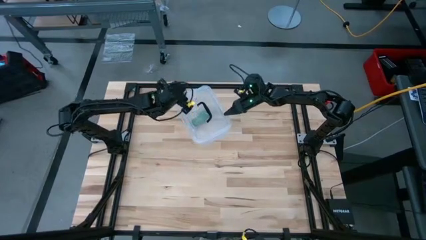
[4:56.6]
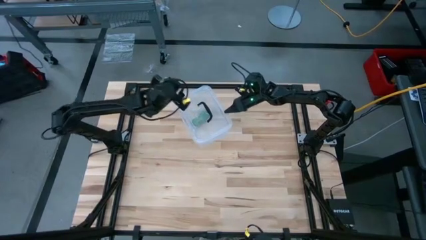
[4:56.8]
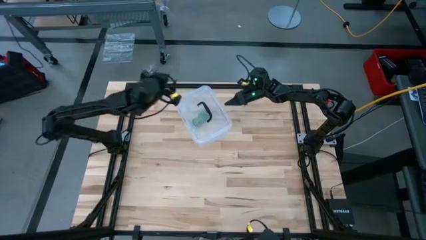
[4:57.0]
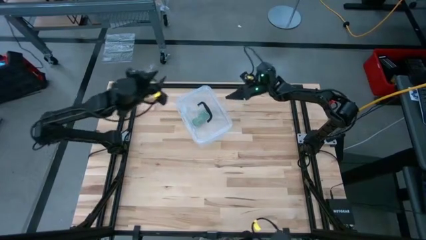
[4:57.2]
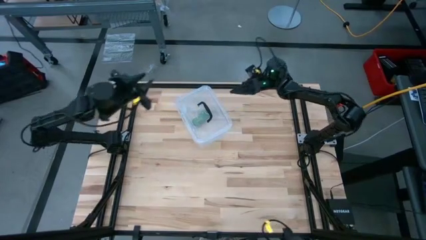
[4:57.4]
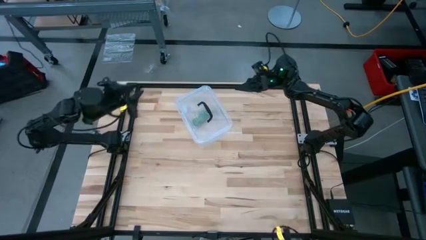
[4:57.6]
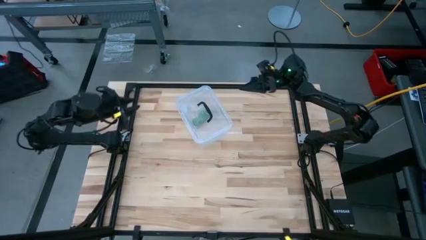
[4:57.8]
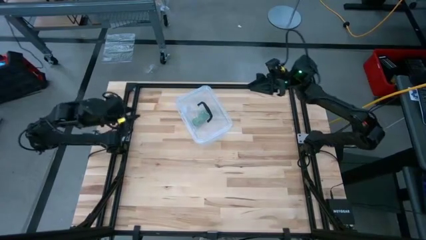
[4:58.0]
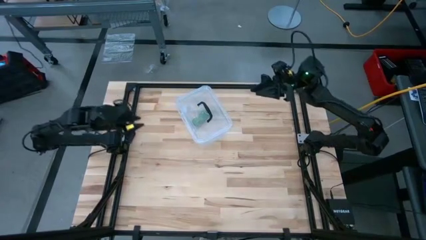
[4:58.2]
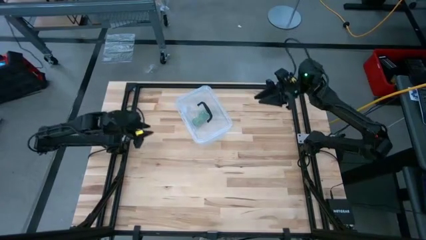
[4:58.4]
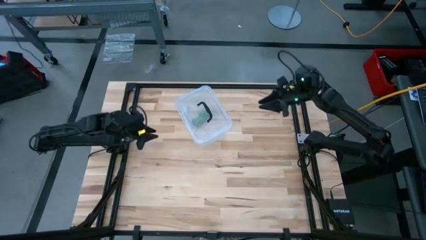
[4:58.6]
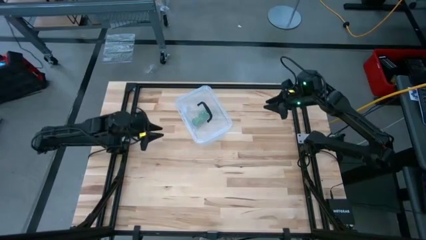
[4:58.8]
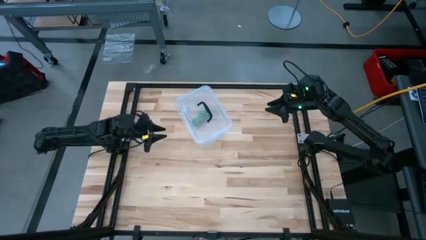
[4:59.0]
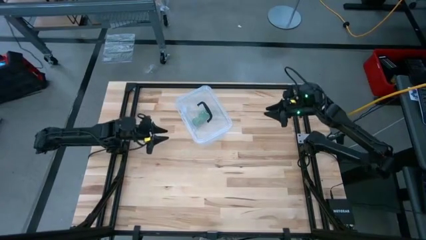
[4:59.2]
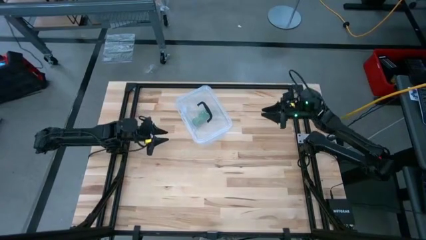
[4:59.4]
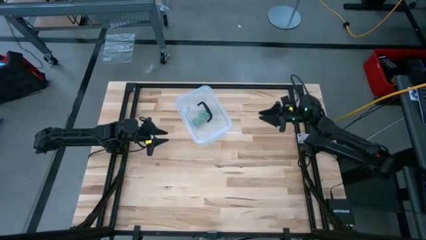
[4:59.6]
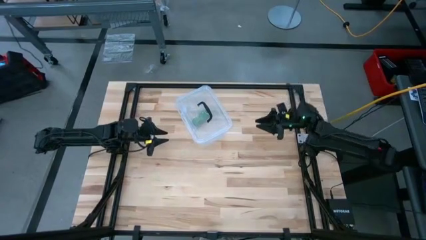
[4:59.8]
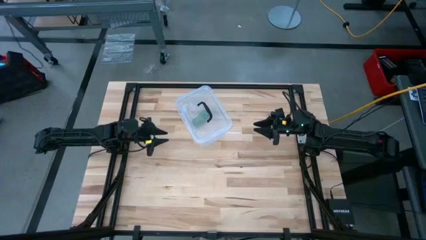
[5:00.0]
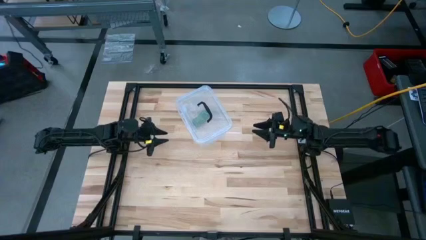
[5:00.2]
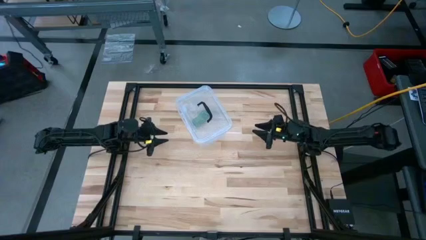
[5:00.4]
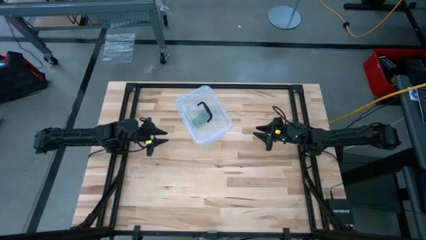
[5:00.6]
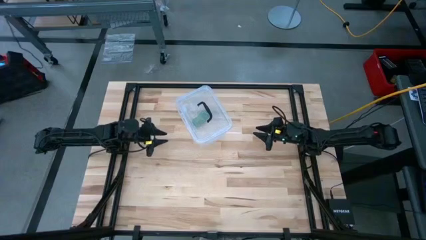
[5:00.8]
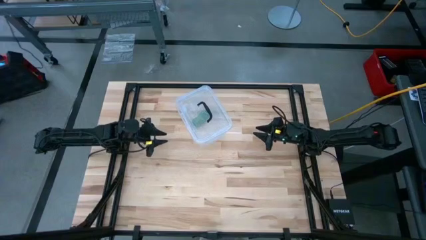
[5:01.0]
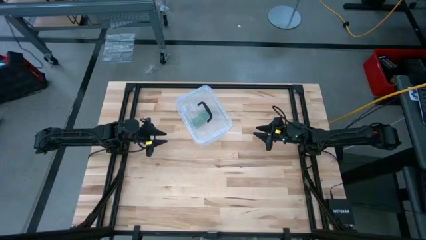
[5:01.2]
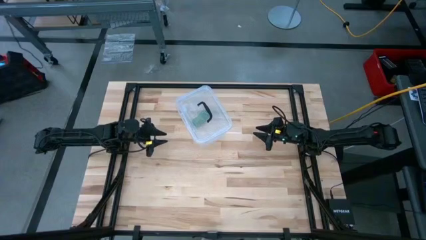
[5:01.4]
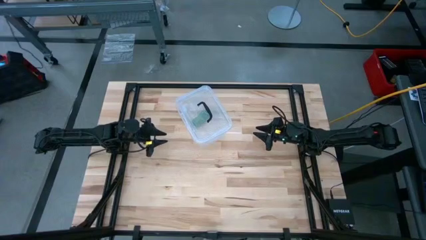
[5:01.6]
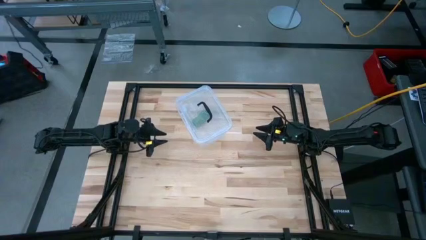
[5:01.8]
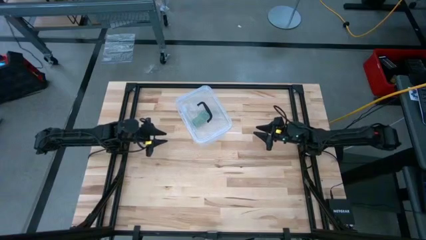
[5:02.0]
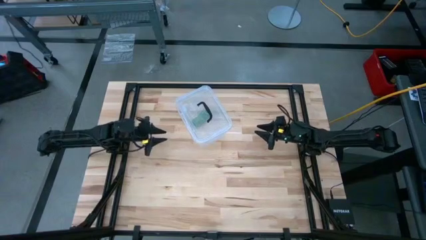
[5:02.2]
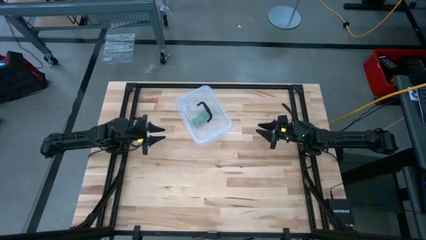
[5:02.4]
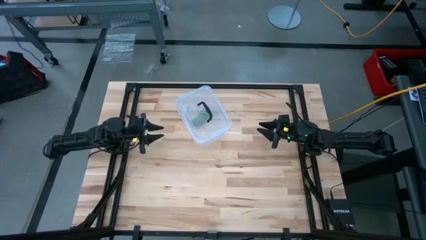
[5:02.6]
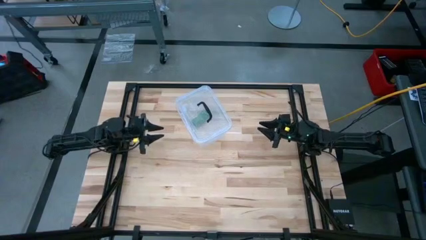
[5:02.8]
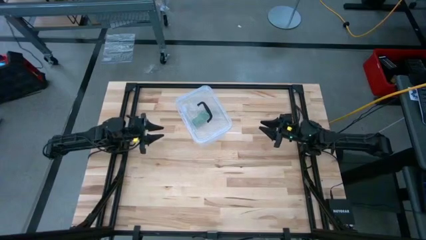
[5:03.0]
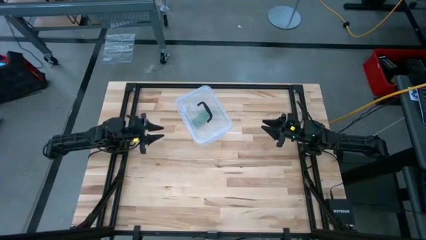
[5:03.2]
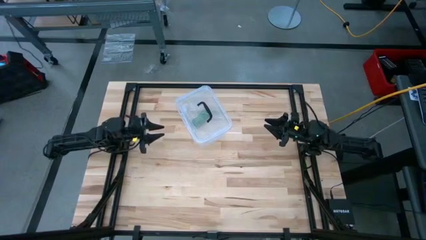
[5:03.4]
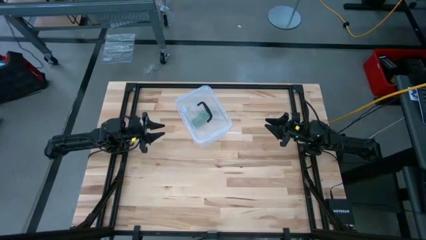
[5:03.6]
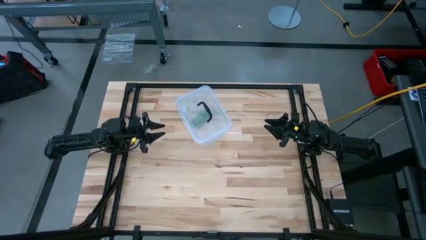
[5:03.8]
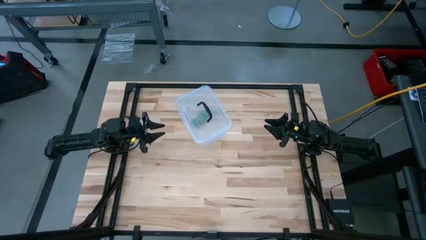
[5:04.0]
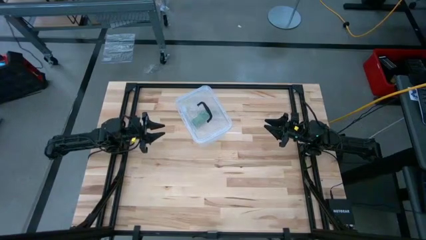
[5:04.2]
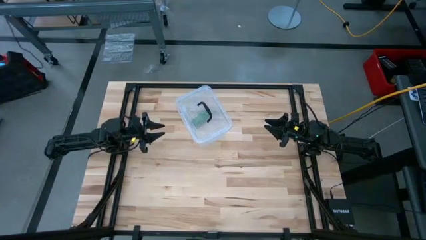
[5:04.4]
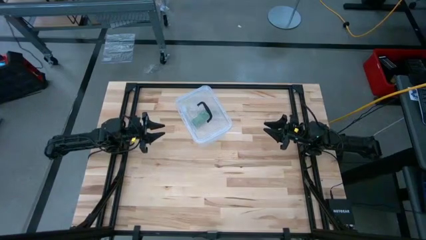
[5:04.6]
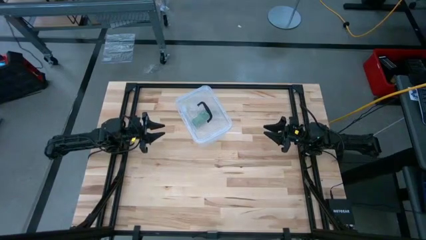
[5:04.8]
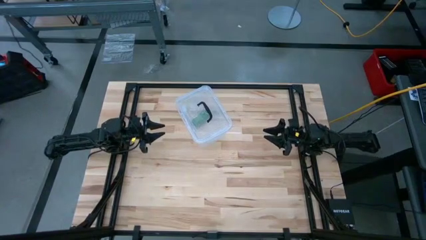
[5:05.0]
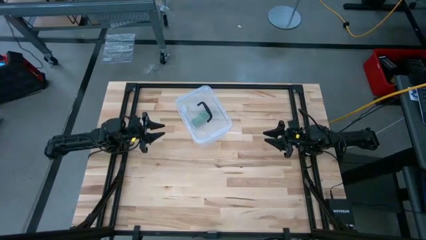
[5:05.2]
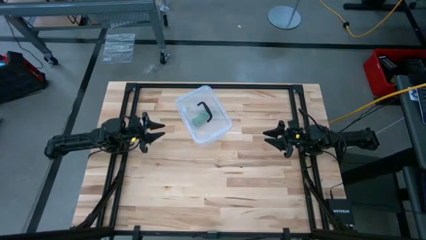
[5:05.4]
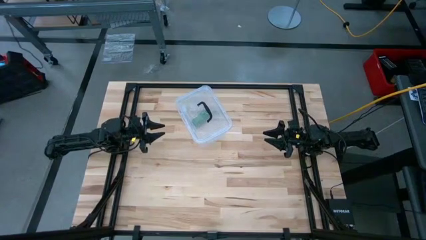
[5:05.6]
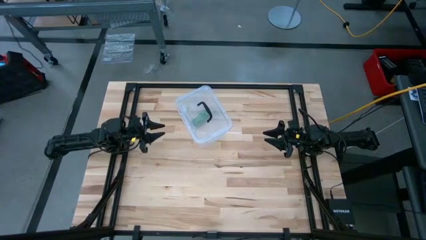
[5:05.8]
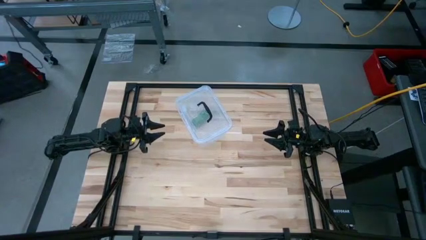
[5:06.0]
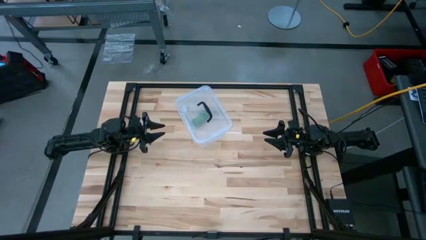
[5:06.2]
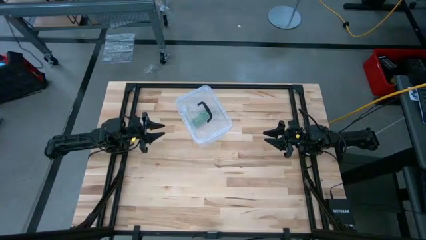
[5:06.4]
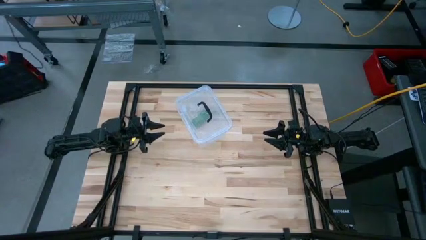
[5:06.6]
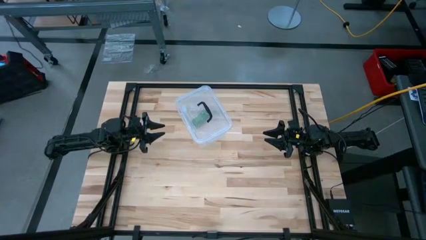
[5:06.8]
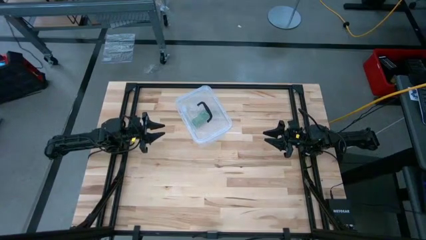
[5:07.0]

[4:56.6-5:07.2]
Task: Roll bandage
Return to Home Position

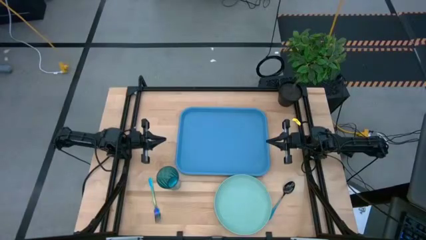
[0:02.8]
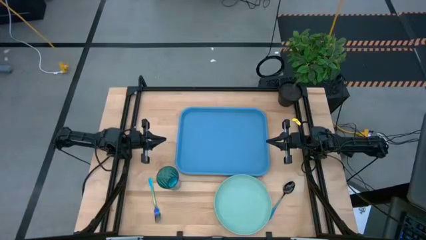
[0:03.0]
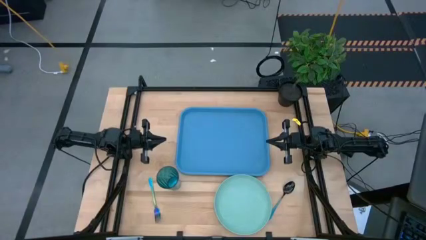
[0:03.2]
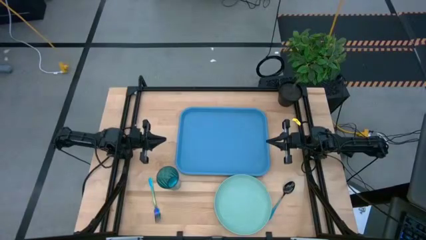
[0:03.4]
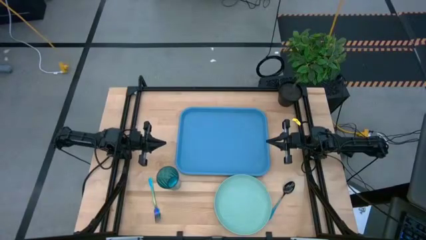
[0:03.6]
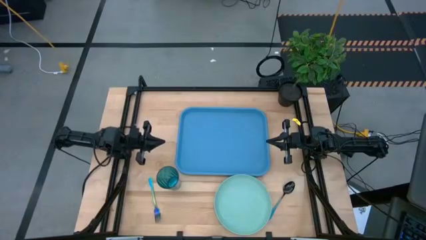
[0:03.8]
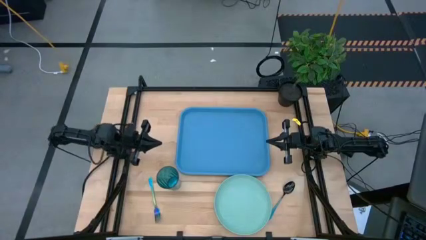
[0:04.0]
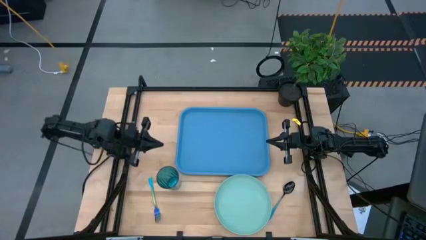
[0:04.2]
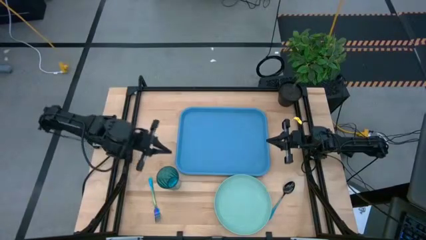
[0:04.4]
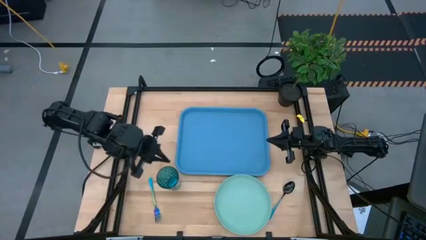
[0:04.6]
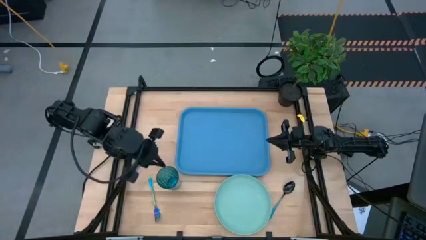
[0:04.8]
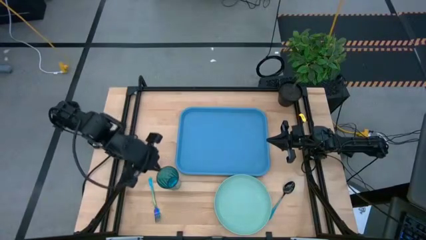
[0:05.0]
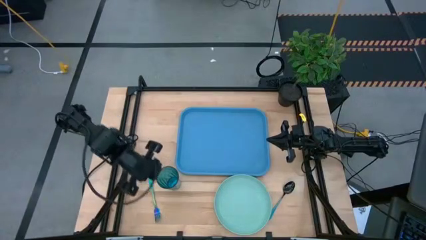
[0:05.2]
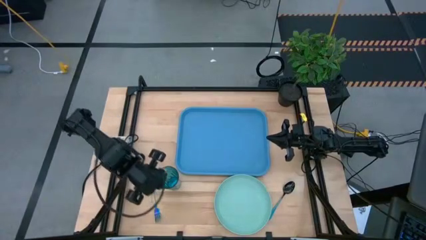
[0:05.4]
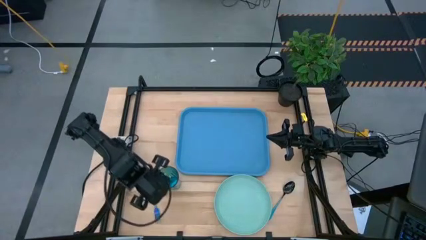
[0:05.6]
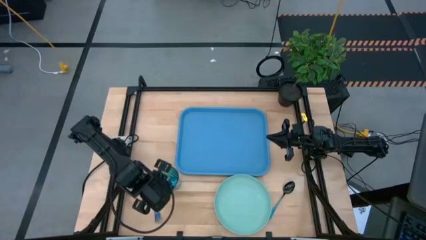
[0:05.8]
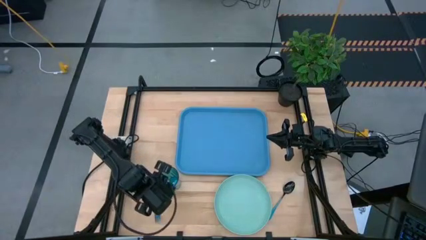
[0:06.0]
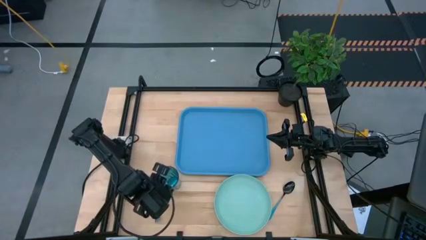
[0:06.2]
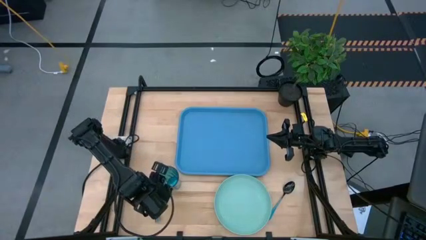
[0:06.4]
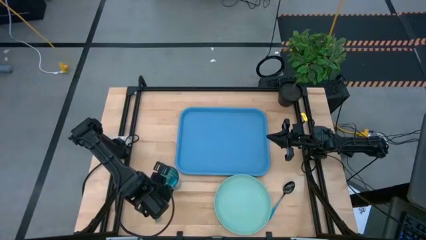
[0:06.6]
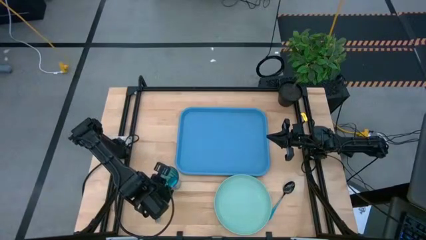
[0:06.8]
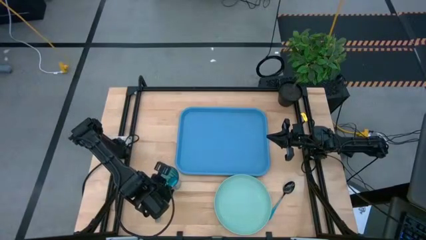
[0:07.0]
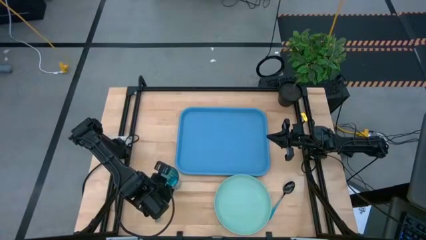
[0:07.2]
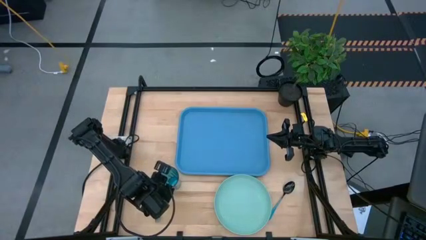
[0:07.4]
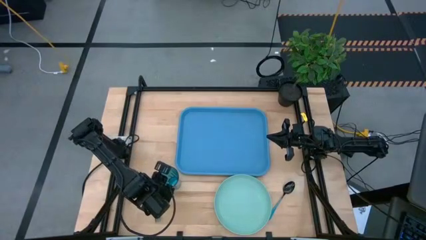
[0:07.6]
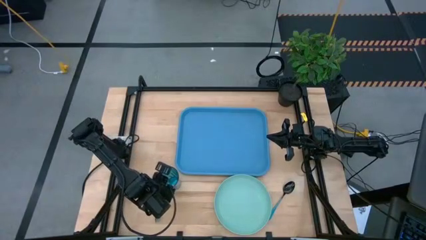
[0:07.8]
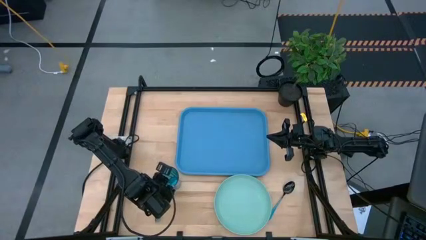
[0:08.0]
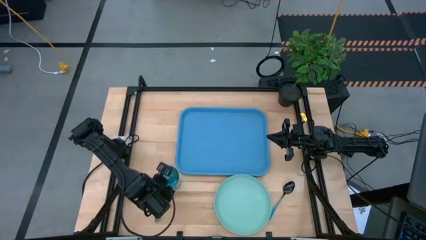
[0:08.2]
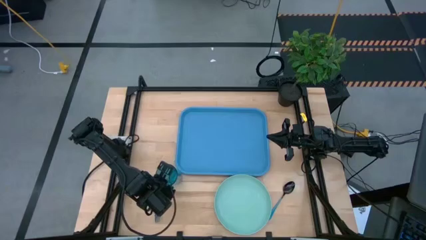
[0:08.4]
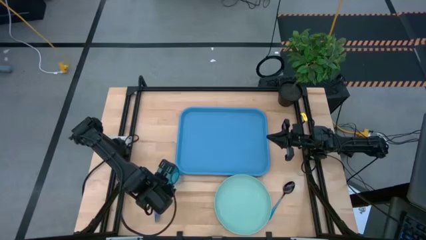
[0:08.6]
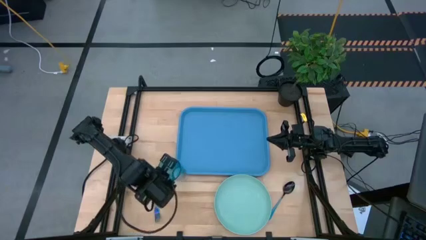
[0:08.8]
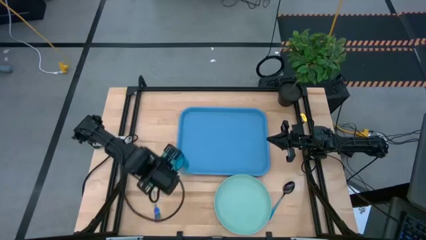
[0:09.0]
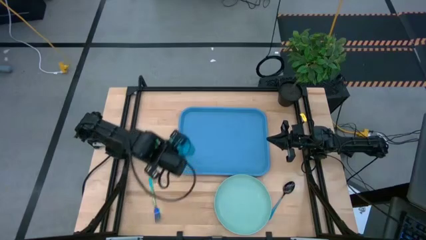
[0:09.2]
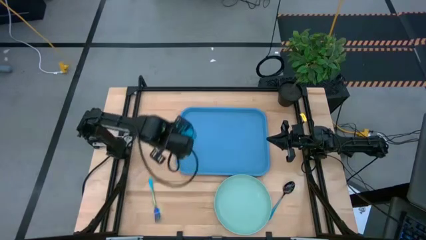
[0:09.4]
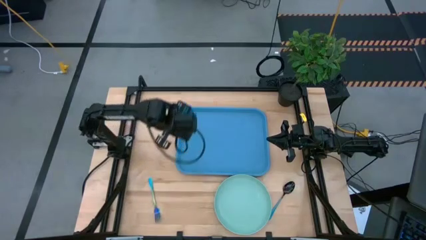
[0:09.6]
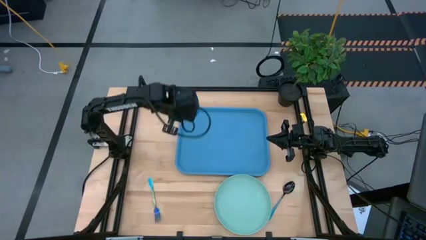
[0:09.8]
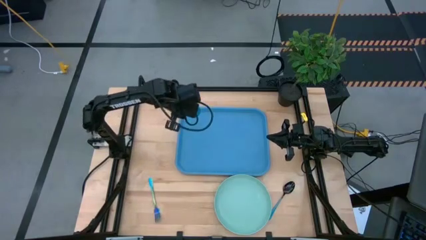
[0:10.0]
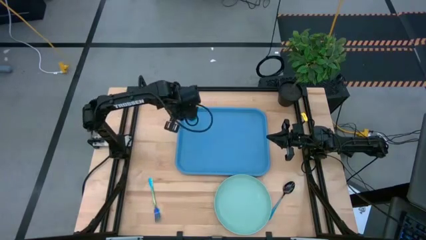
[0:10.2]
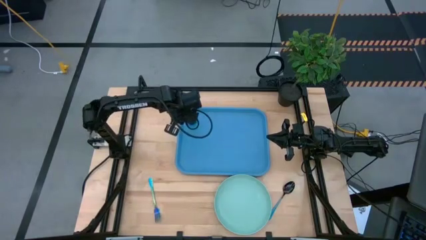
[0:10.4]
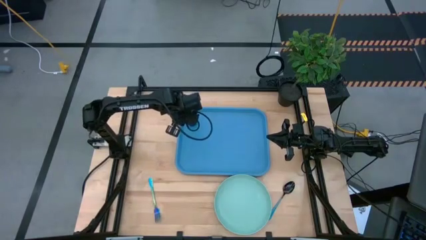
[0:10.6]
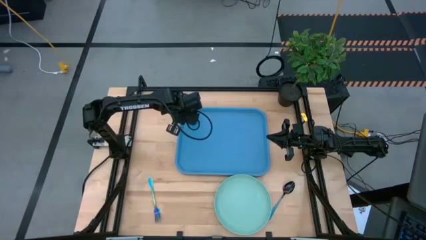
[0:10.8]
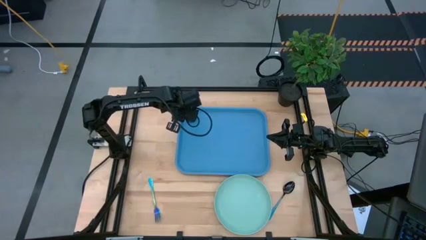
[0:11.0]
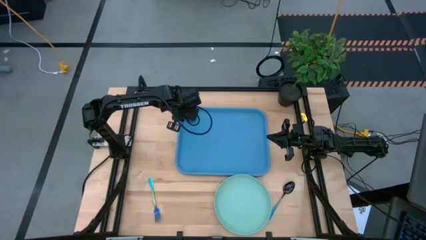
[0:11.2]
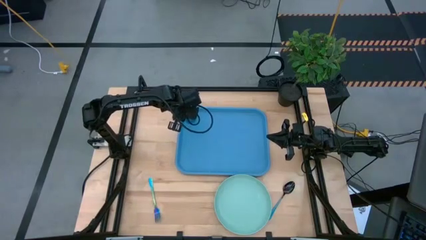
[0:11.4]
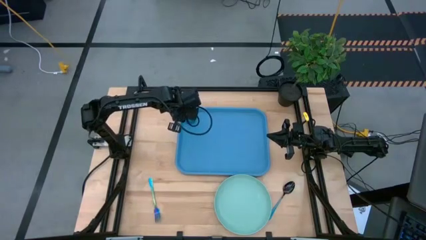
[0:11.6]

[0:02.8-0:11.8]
Task: Pick and place plate/cup/fork/spoon on tray
Put the blue glass on the blue serving tray
